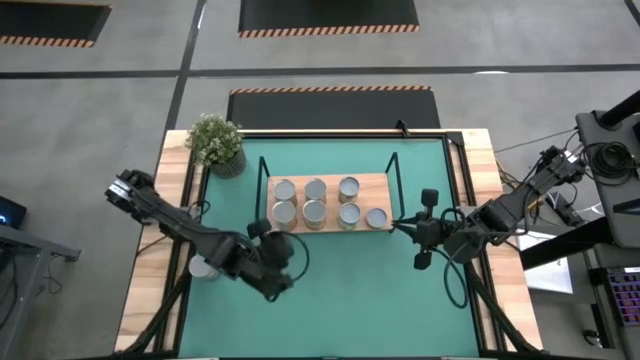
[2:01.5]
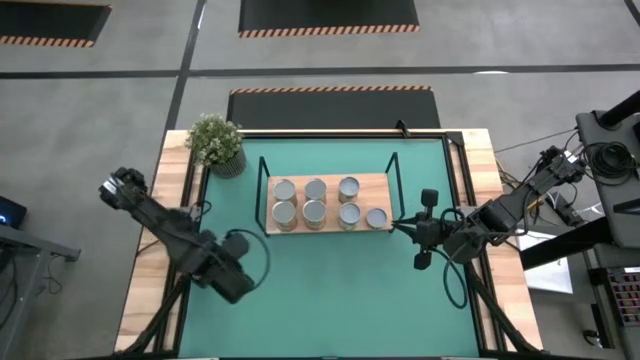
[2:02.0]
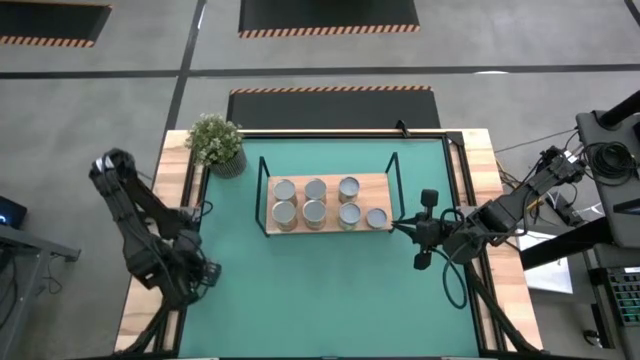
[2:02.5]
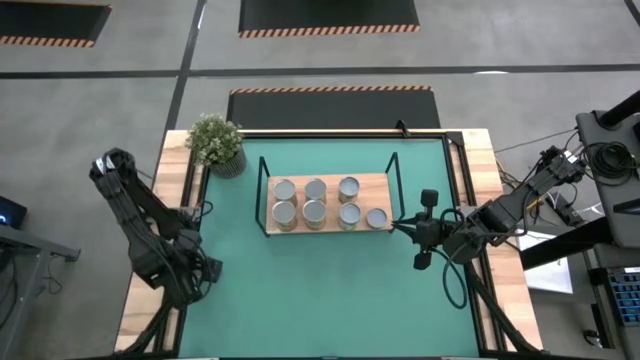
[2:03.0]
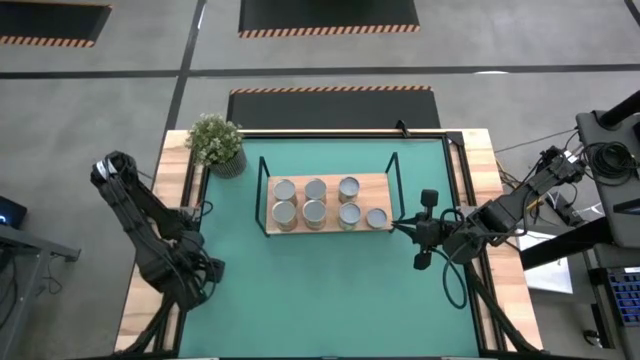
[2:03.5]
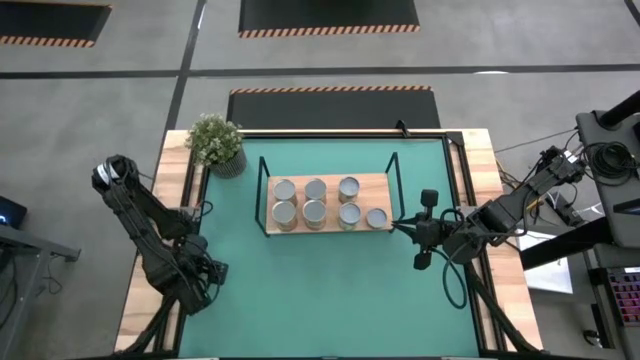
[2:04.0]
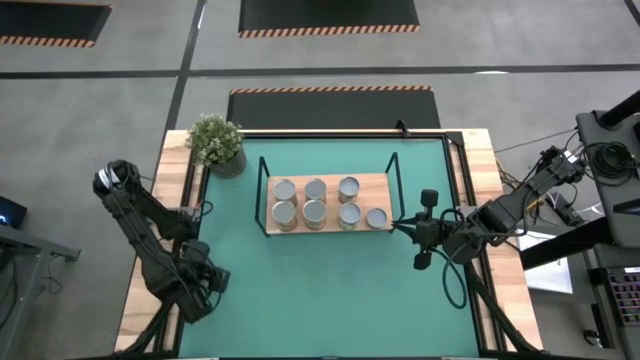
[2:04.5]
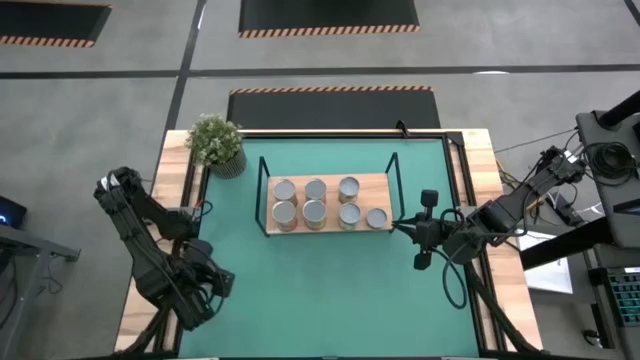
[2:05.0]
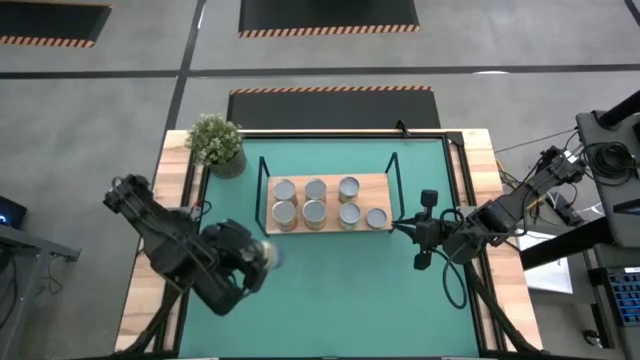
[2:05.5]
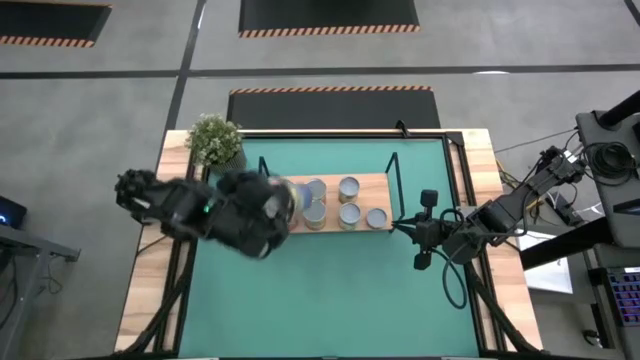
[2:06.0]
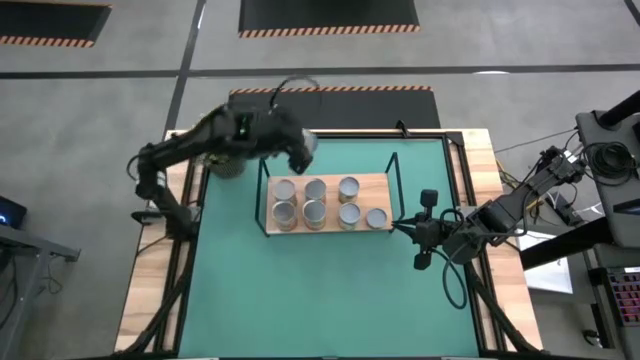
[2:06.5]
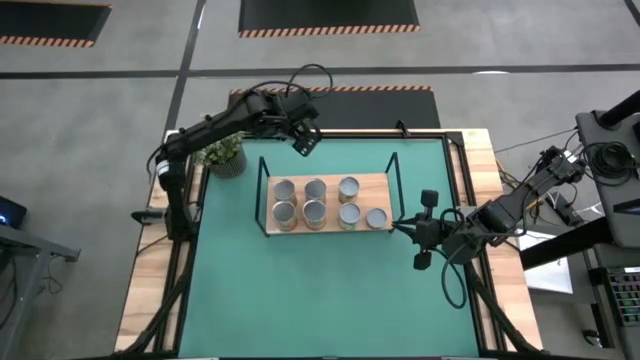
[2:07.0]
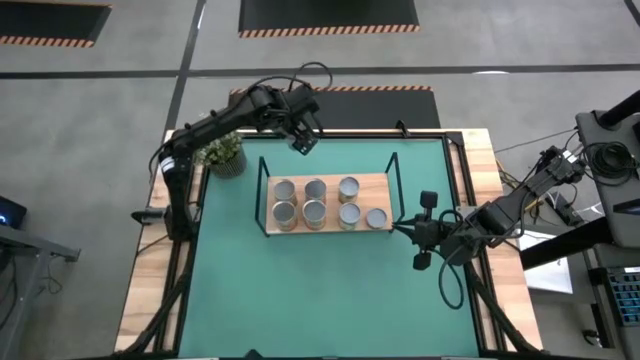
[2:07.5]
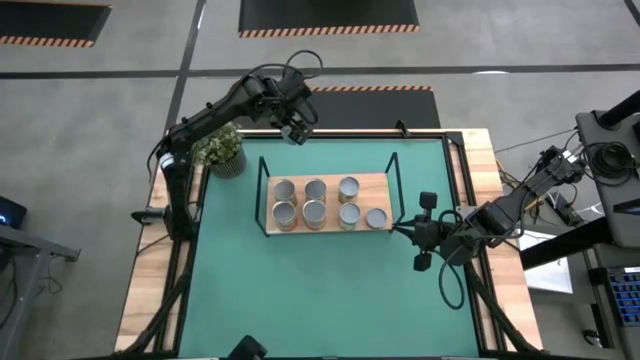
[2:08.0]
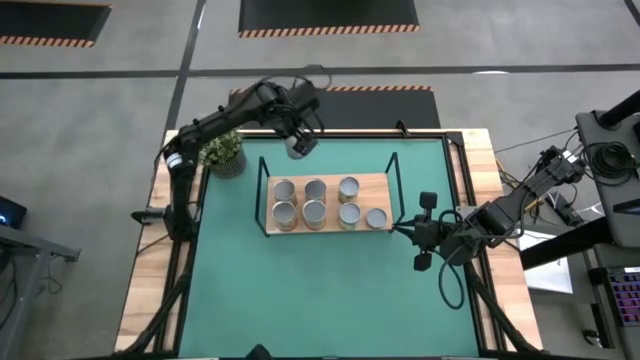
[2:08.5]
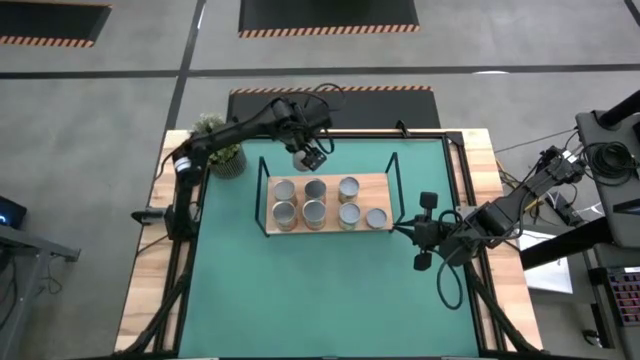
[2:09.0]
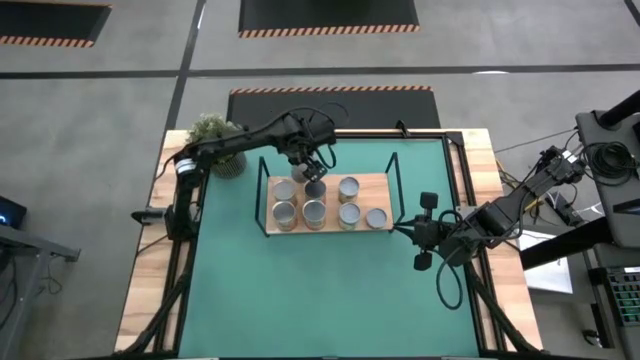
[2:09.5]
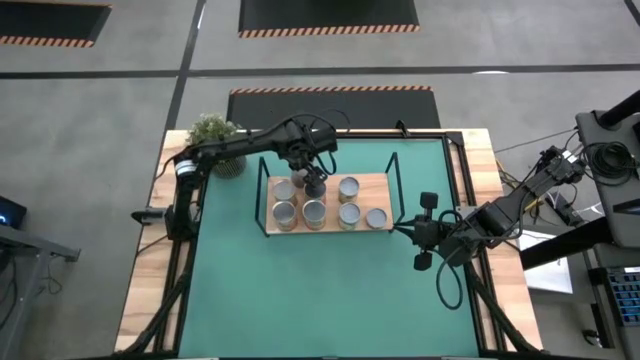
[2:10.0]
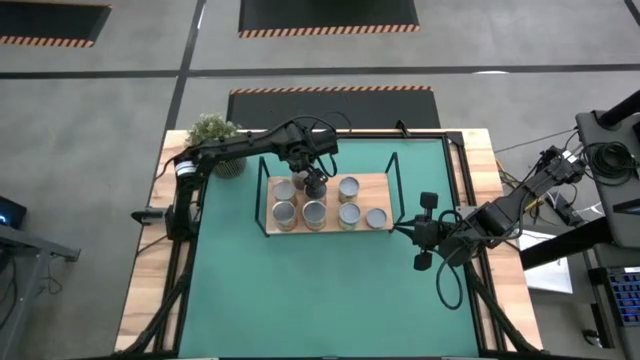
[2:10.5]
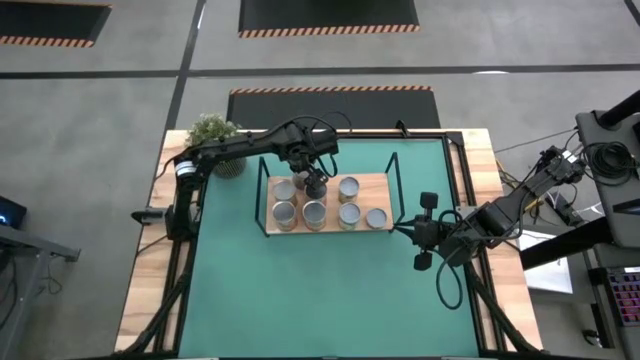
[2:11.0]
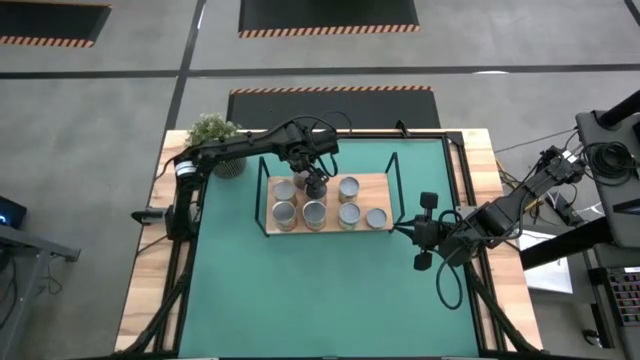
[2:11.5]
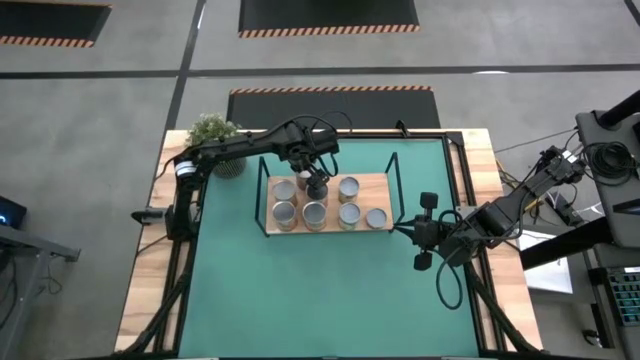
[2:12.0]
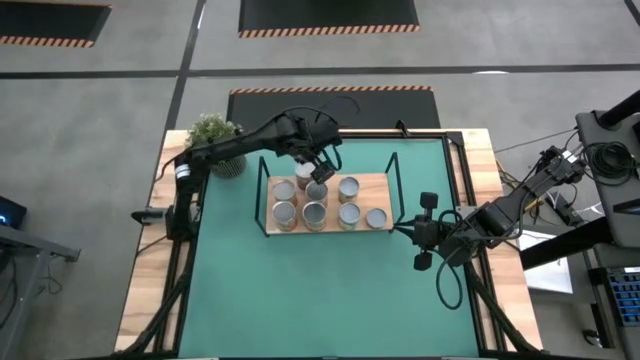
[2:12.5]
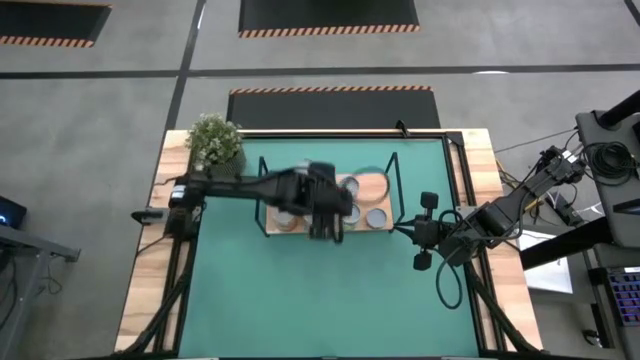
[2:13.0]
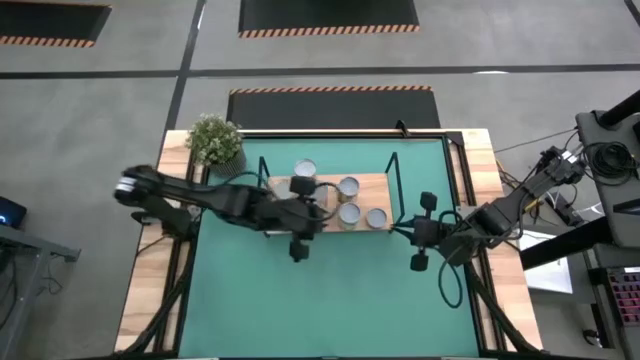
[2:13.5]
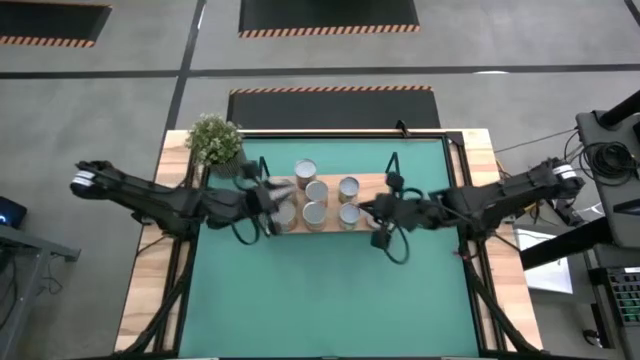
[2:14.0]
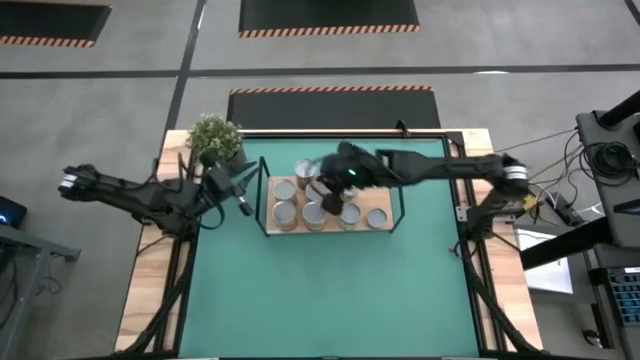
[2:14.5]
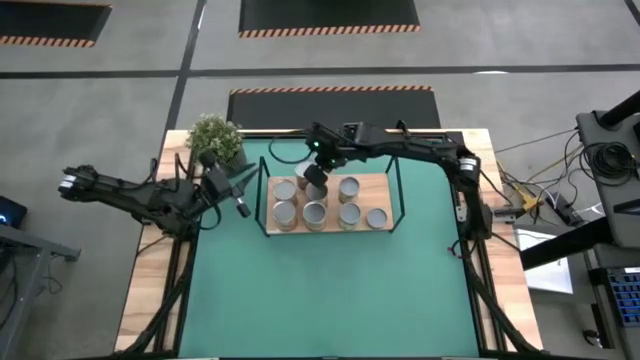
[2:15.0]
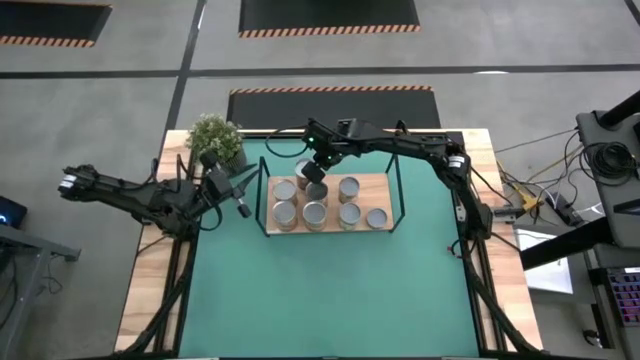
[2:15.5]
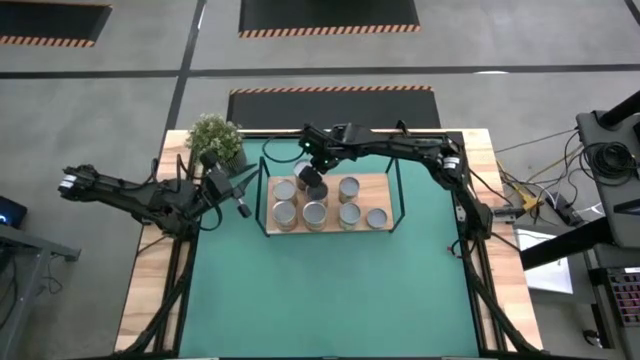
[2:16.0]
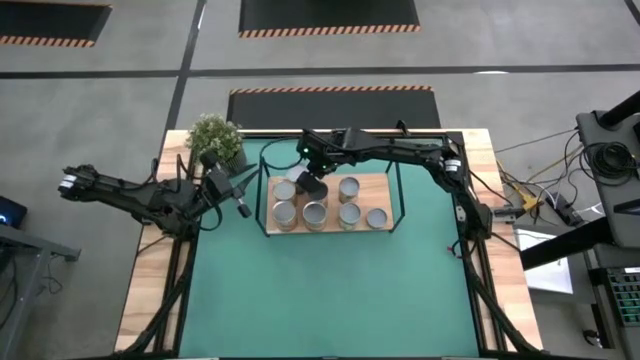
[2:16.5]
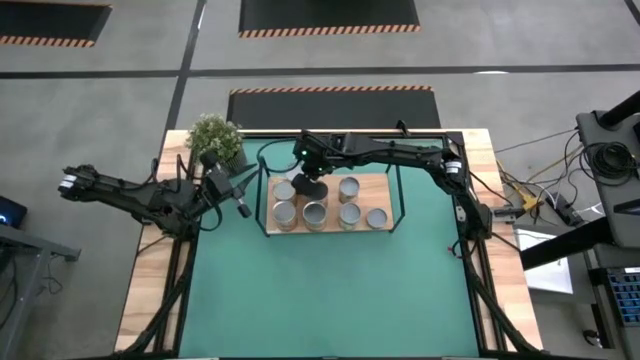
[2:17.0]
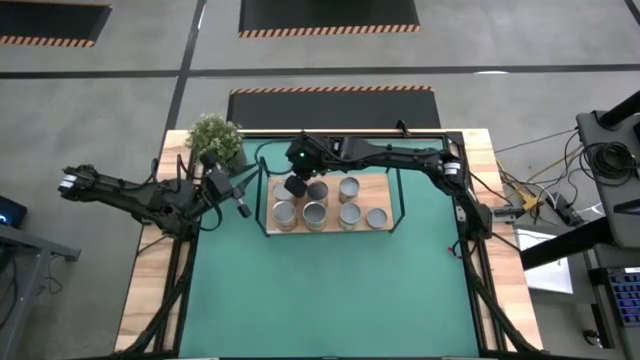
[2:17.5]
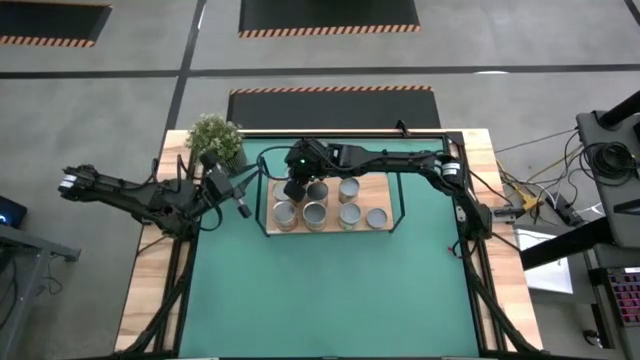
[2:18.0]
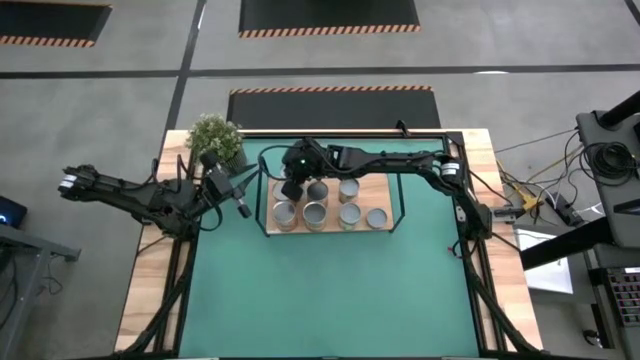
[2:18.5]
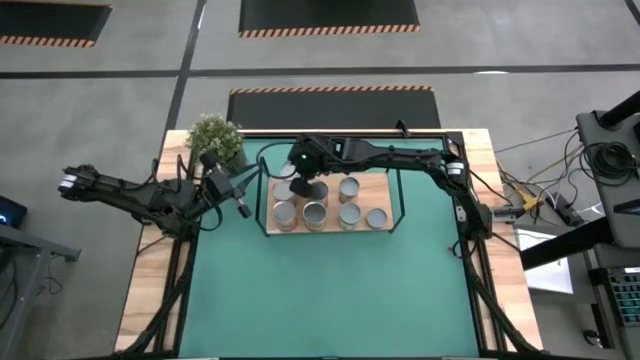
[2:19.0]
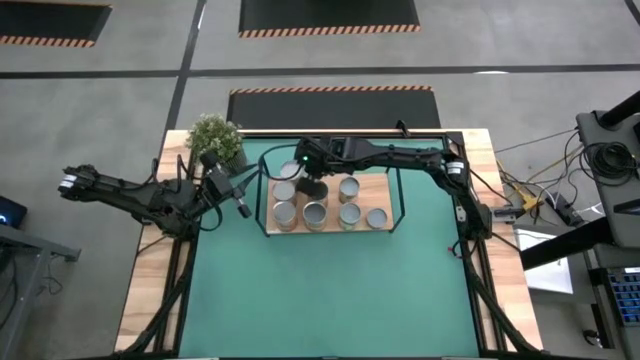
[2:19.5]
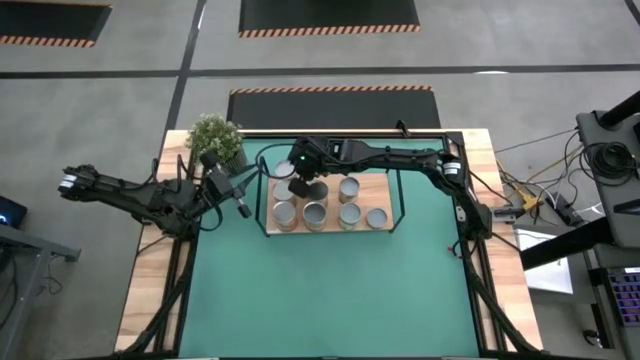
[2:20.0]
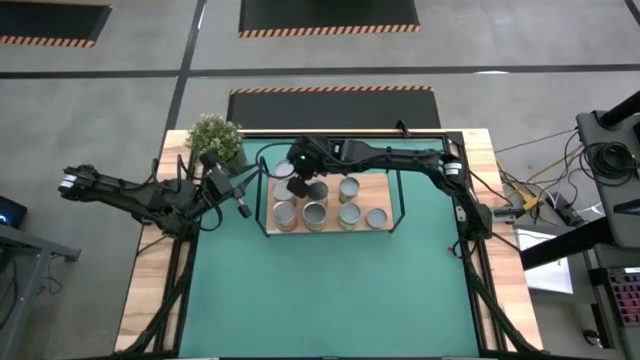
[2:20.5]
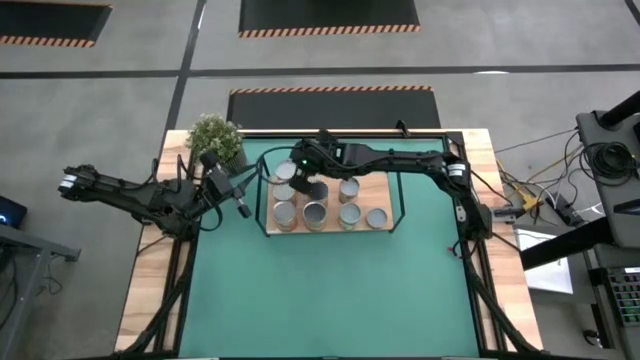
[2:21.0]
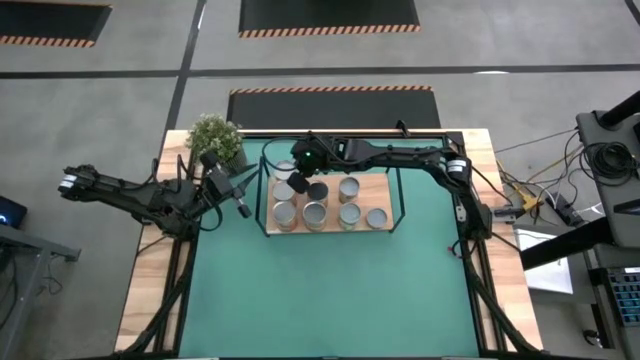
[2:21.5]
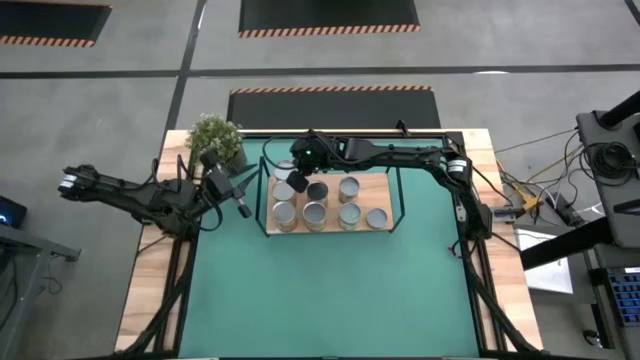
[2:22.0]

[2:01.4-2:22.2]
Task: Pick and place cans onto a shelf
Put the canned peas on the shelf
